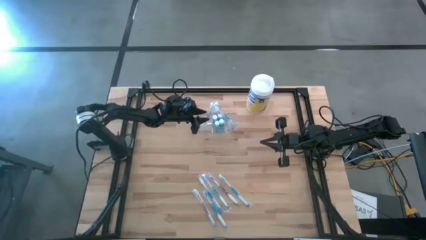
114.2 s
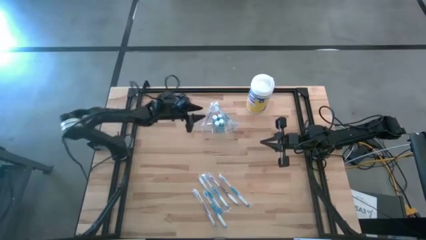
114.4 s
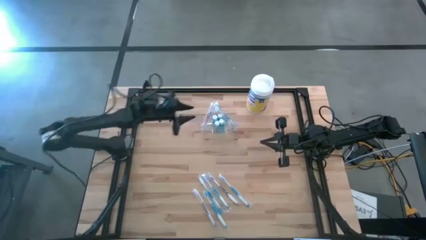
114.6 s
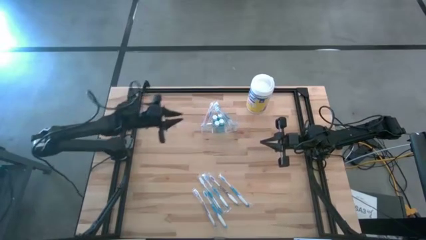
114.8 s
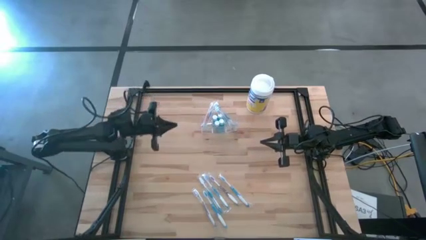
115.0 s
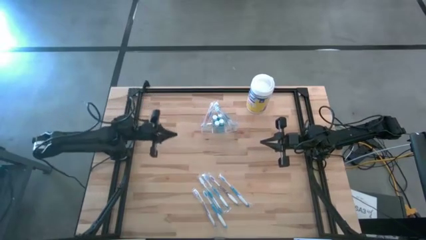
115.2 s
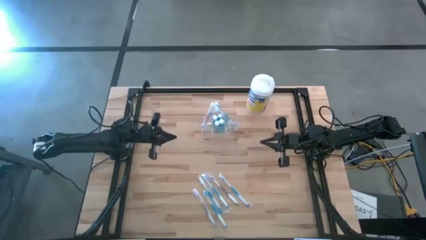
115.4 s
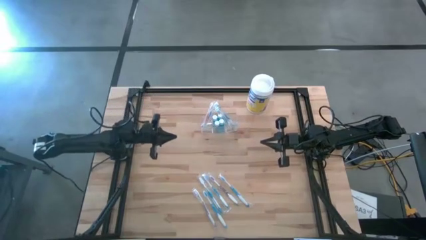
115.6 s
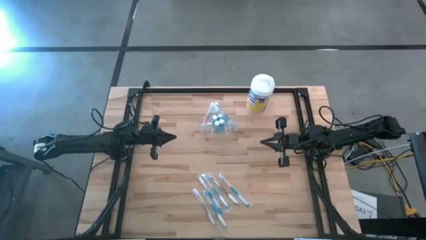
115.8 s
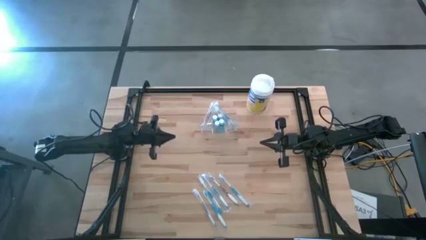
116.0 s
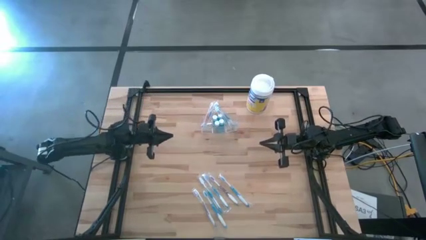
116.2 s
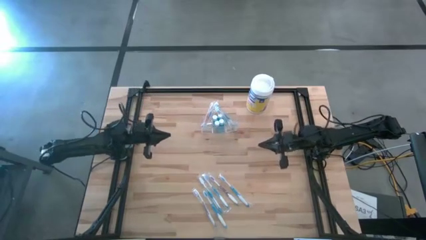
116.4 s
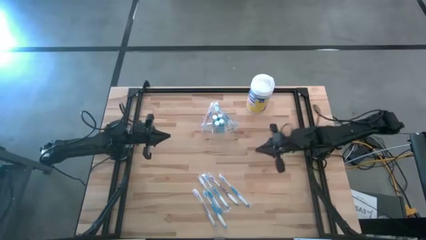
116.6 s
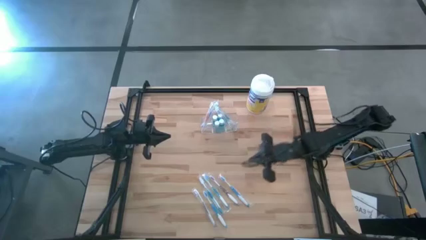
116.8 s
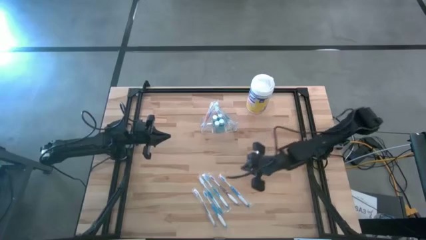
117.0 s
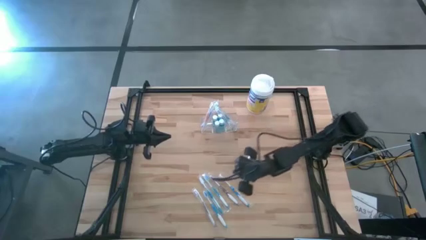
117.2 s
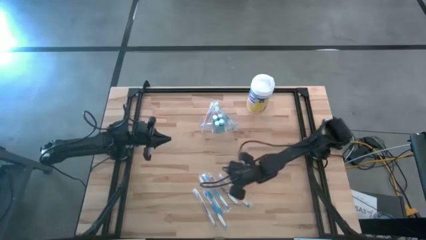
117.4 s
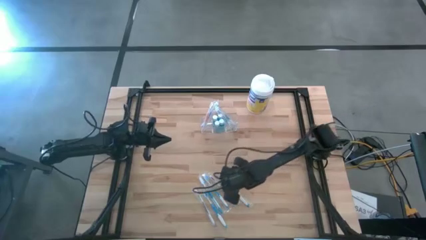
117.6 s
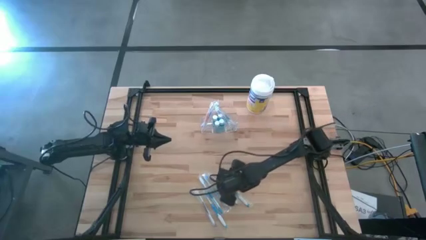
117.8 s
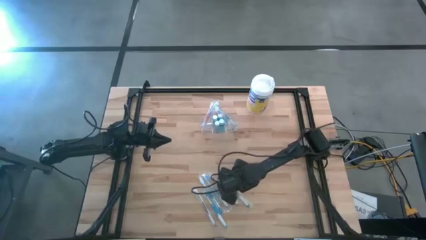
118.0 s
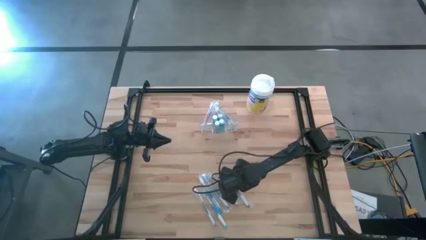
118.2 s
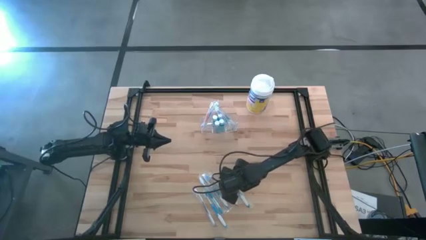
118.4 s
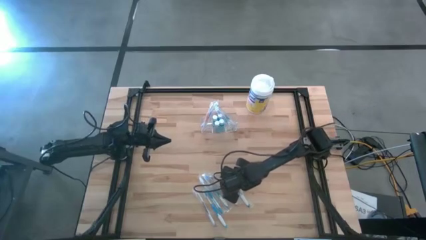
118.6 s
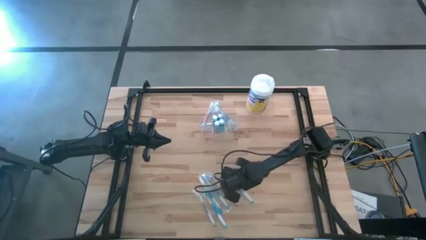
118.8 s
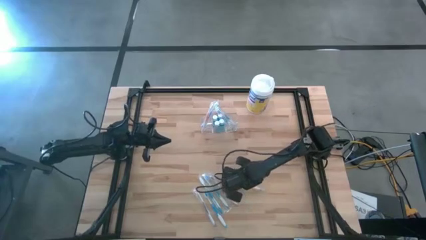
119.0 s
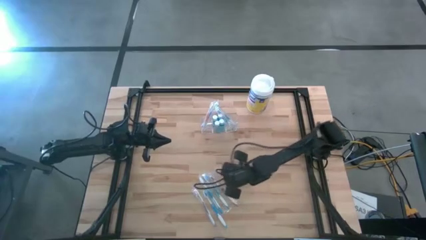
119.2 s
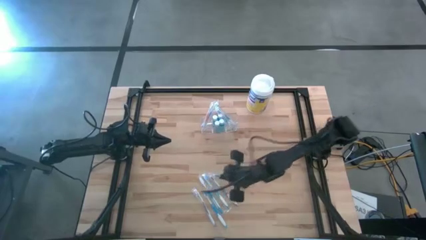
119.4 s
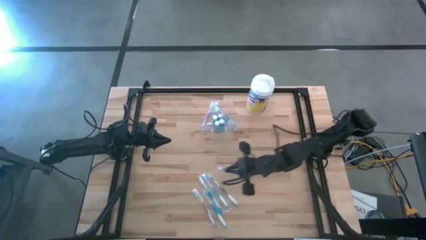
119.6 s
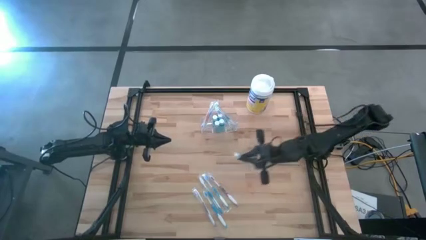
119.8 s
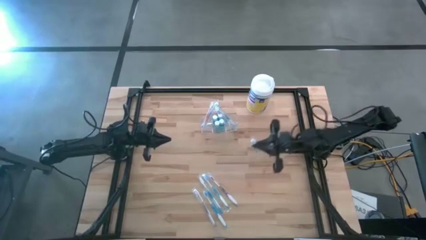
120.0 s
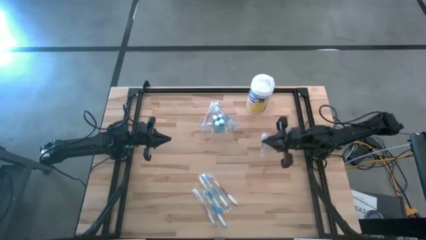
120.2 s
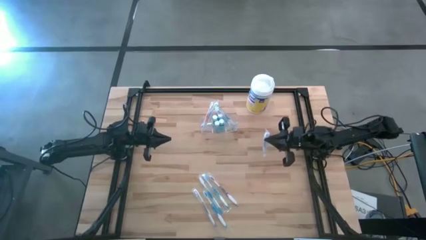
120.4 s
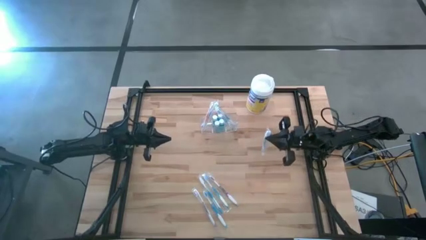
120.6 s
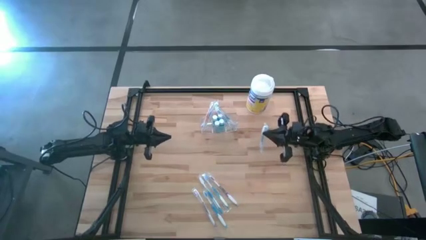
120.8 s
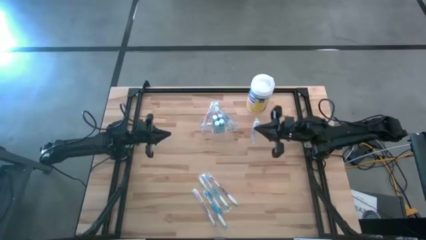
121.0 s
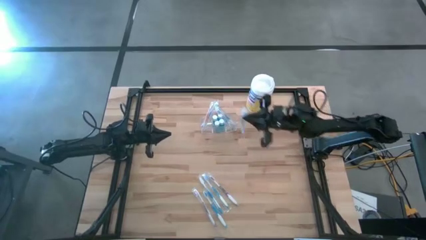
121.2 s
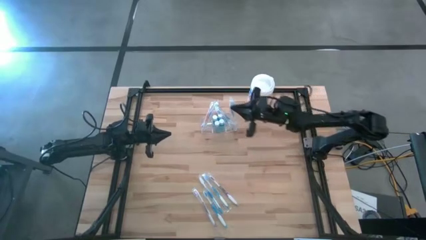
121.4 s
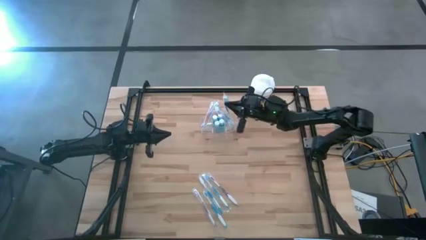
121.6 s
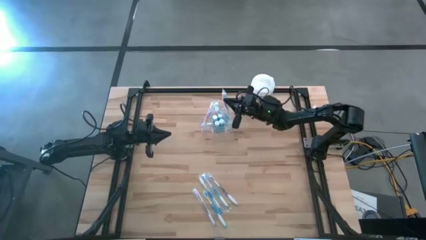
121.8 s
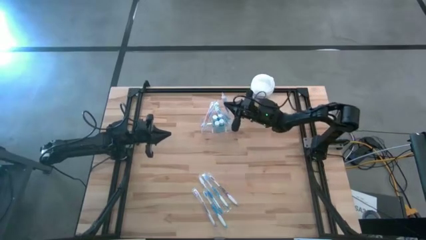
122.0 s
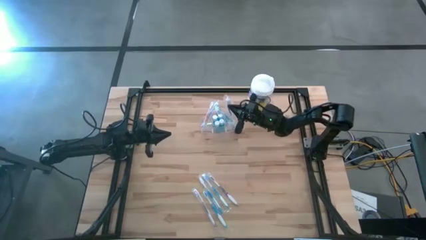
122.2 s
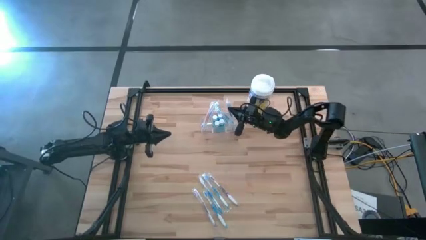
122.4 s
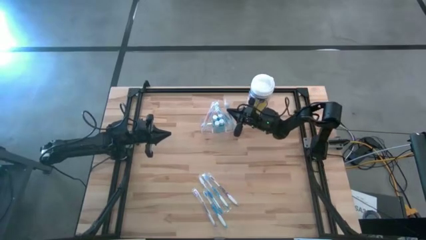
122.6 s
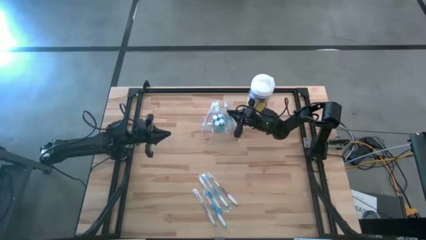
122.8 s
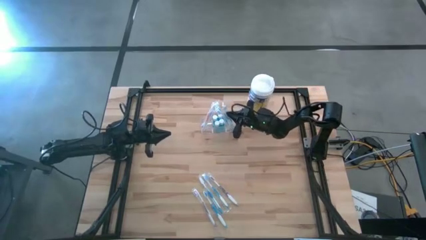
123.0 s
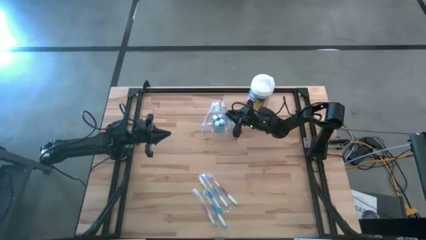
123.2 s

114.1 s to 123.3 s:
Task: Pick & Place toothbrushing station
Put the blue toothbrush into the transparent organizer

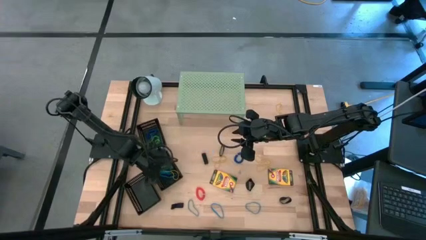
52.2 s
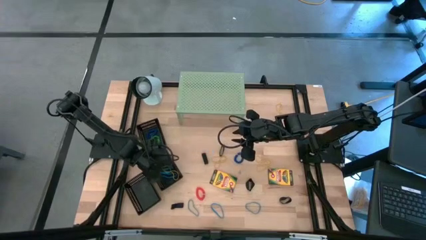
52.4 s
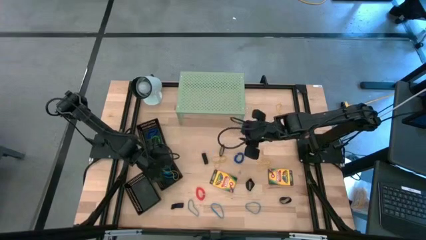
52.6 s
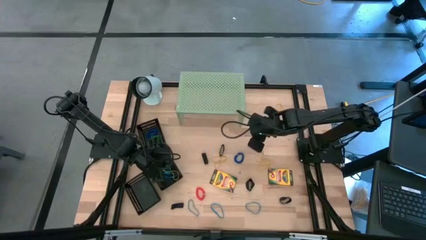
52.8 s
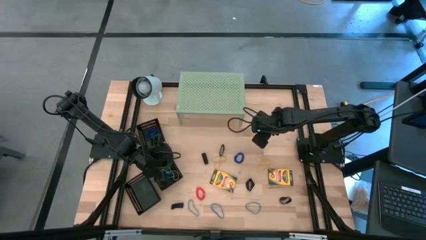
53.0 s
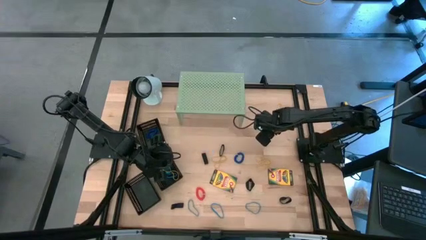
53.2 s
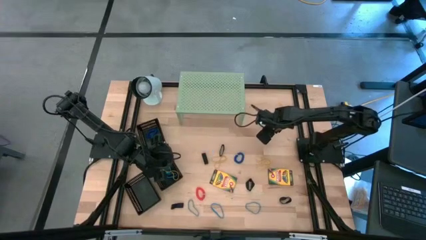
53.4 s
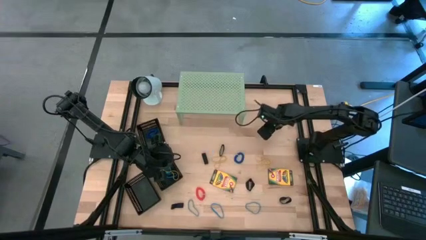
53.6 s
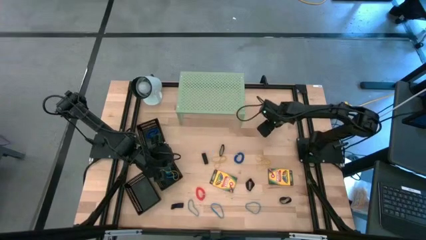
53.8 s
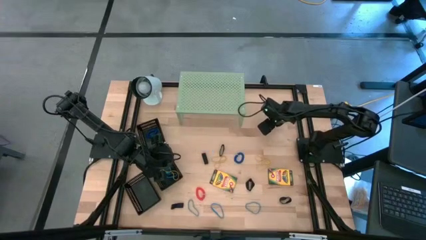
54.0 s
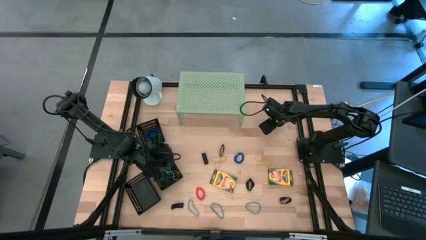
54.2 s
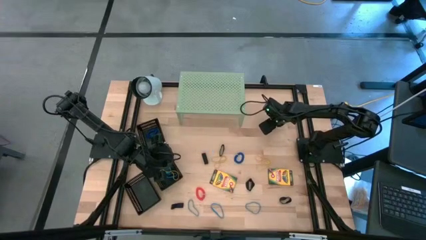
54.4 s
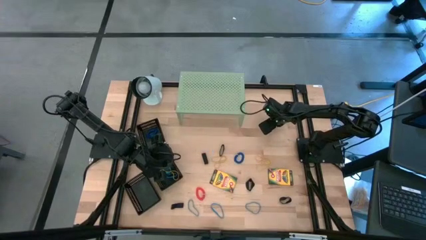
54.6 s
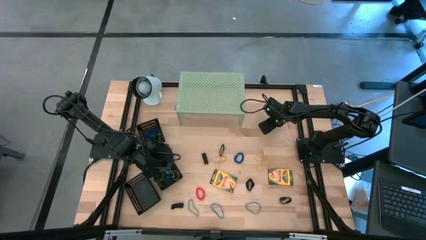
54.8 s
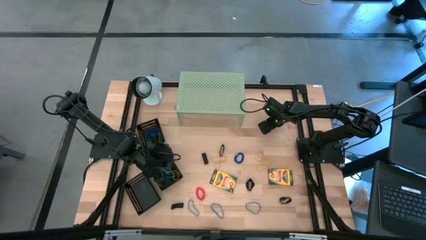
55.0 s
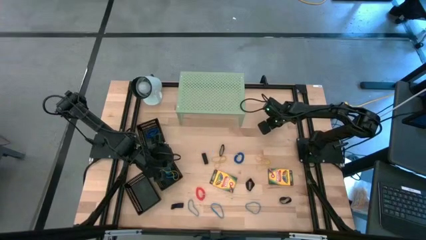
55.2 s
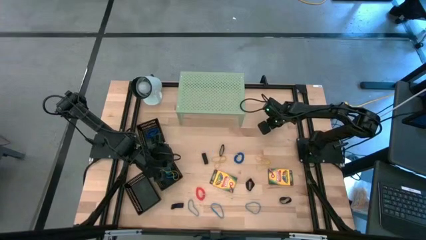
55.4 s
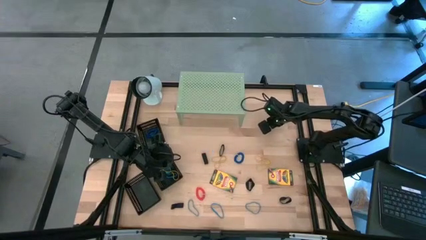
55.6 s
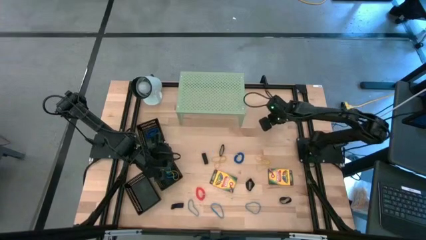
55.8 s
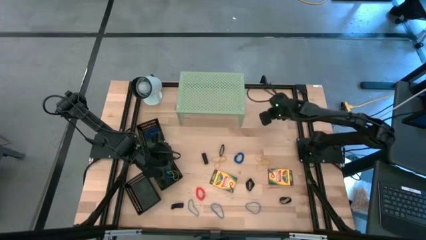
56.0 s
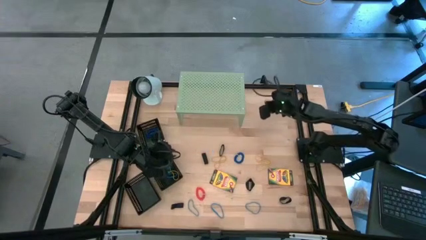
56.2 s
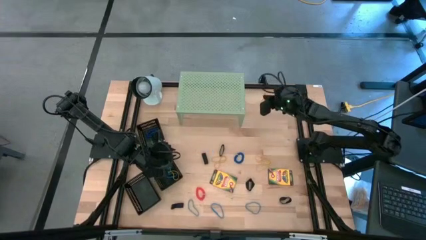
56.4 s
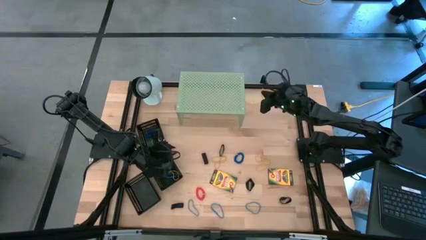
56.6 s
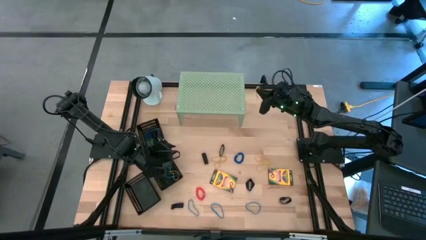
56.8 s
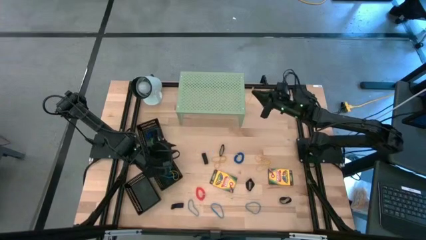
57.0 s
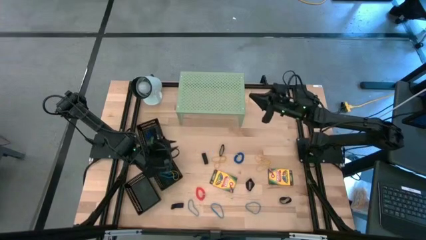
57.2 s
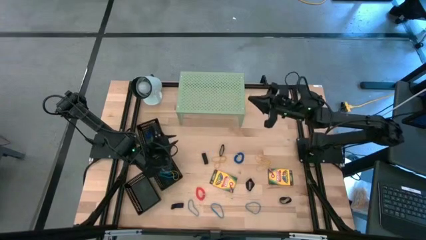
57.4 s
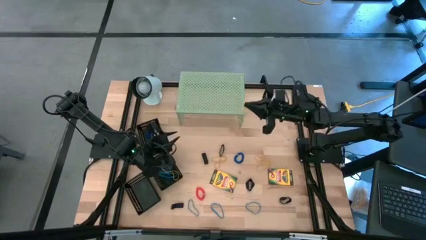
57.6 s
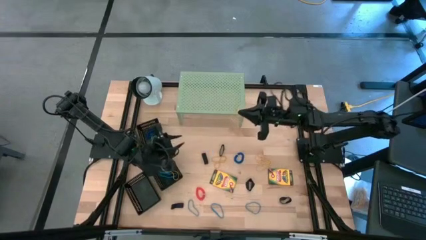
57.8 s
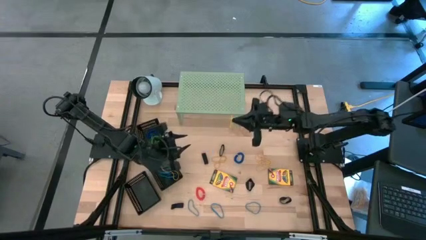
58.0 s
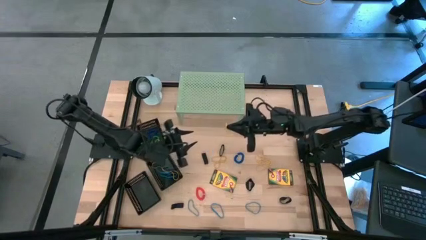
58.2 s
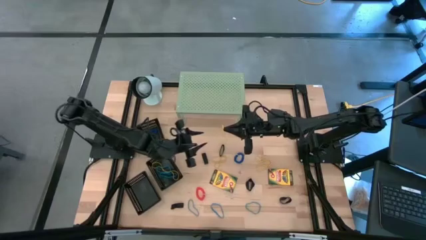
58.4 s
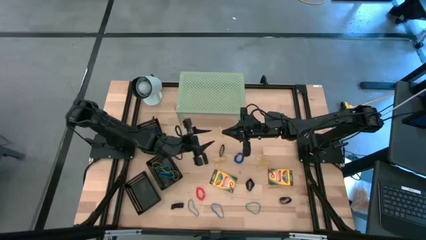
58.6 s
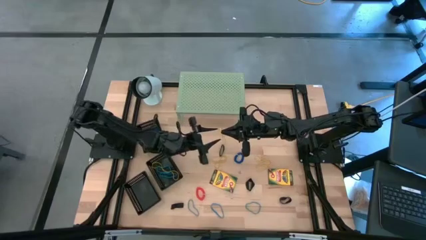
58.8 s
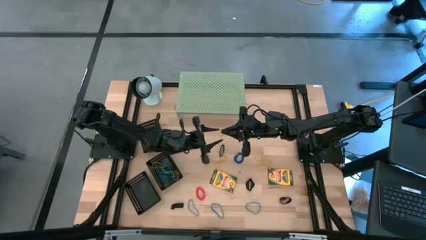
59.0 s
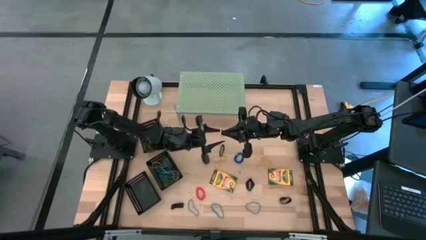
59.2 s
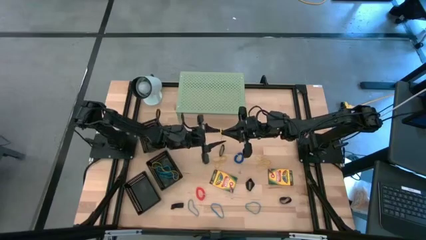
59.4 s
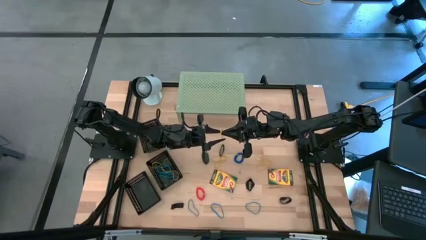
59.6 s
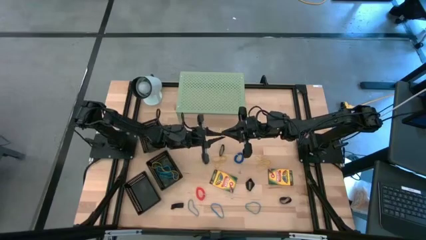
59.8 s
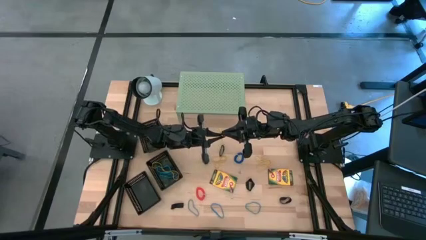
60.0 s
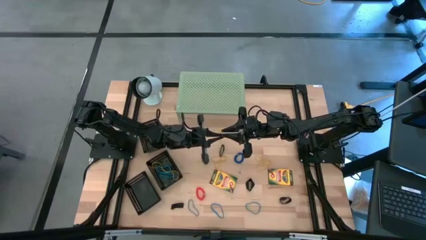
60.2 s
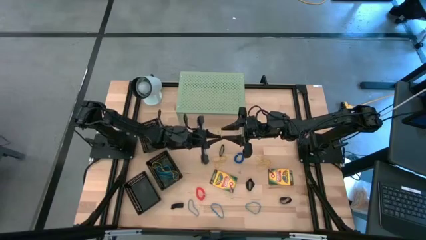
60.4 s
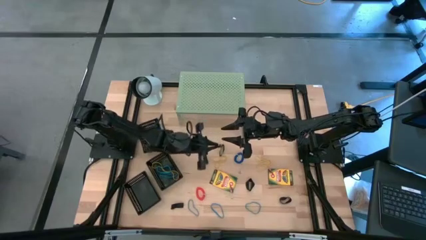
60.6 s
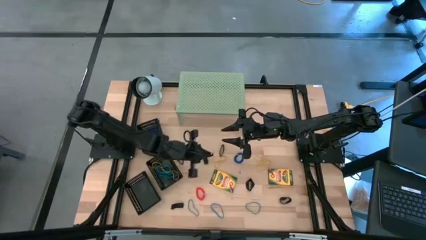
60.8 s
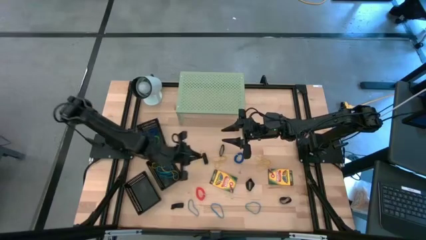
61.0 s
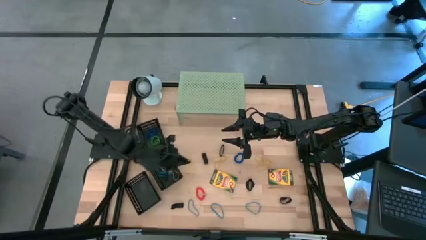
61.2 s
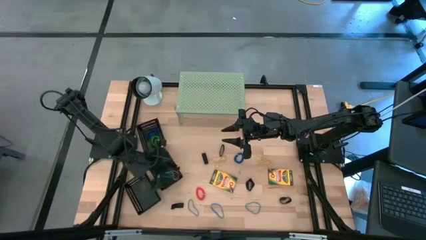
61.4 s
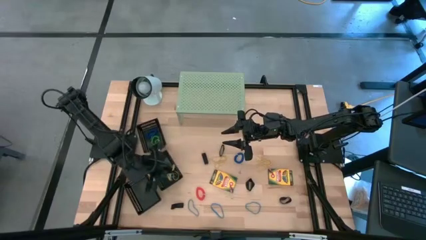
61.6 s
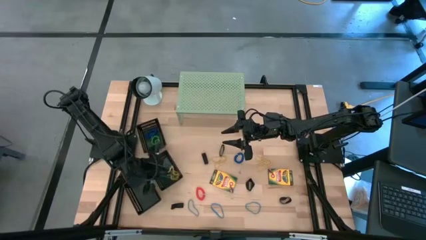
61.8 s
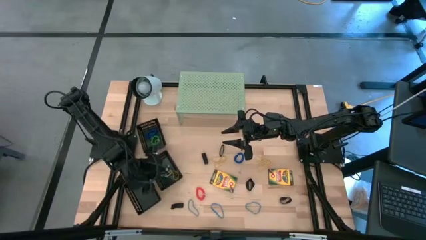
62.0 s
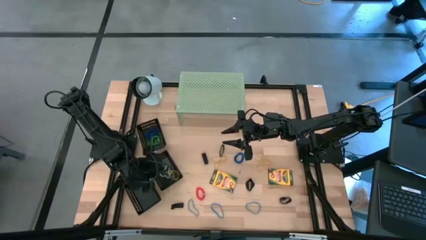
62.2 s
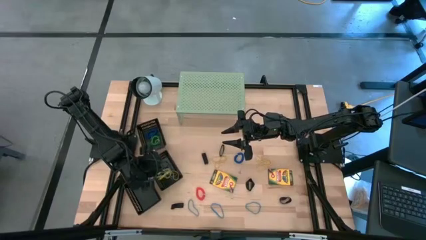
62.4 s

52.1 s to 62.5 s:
Task: Pick & Place Office Desk Supplies
Put the yellow rubber band into the middle black bin
